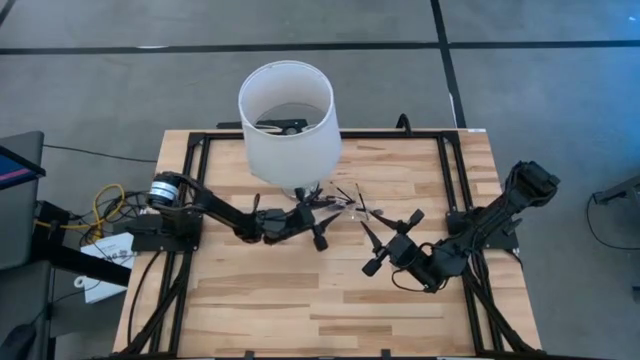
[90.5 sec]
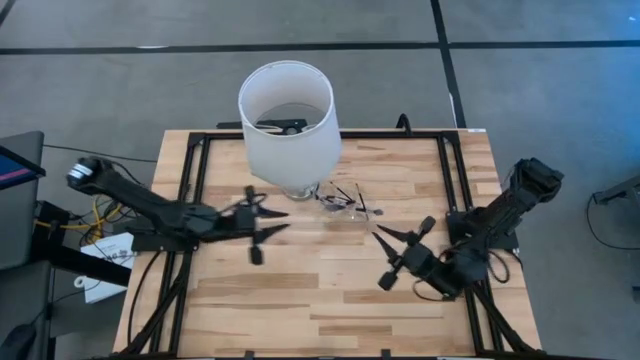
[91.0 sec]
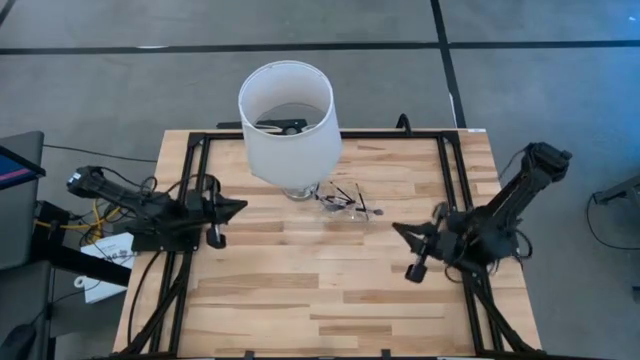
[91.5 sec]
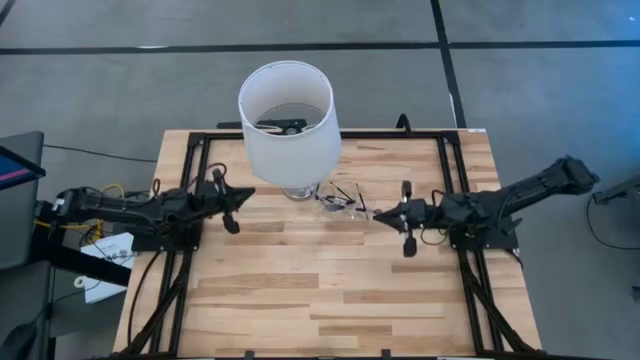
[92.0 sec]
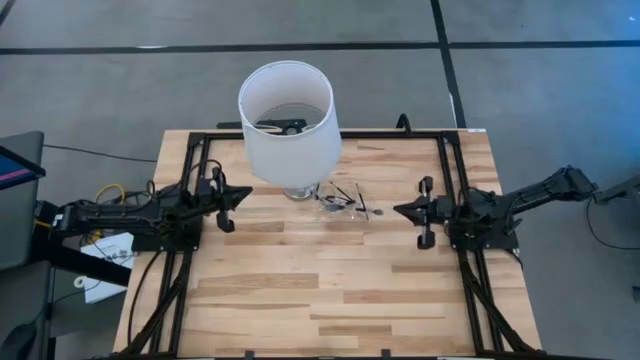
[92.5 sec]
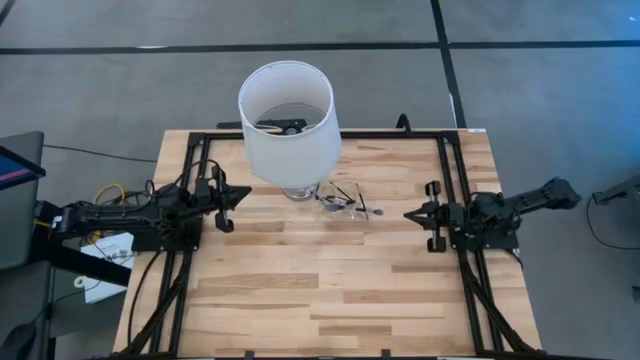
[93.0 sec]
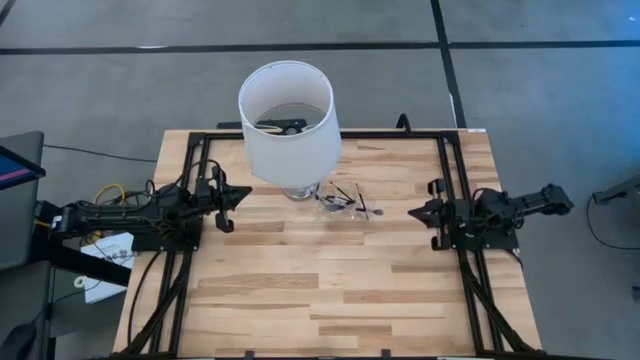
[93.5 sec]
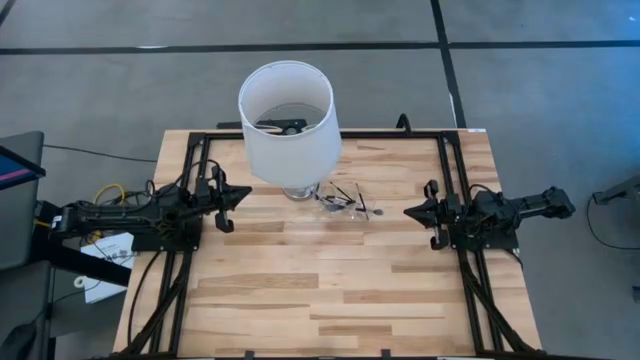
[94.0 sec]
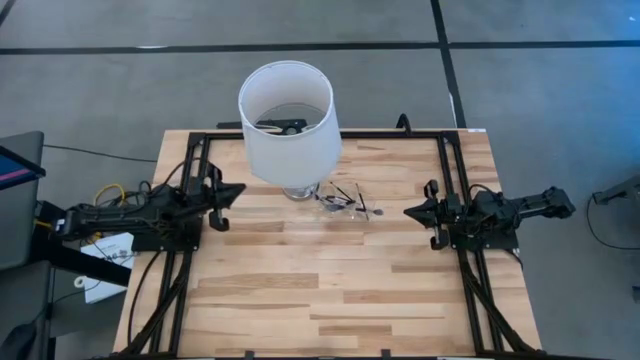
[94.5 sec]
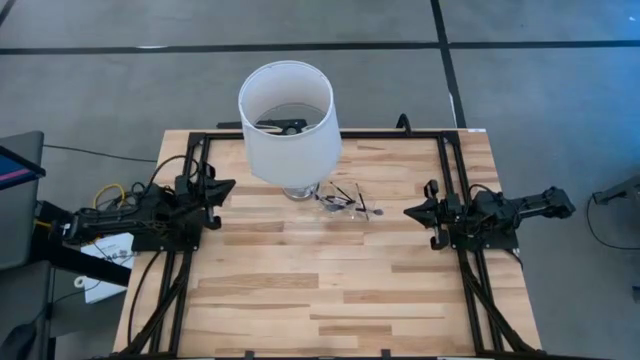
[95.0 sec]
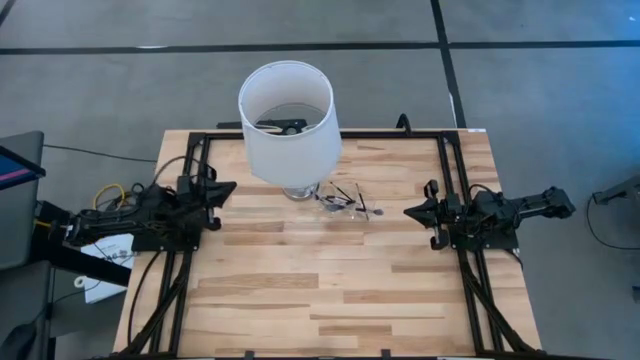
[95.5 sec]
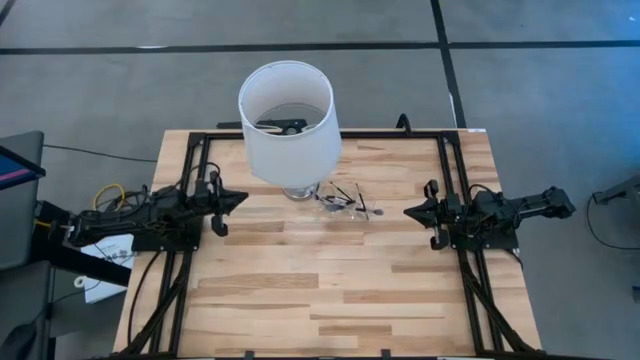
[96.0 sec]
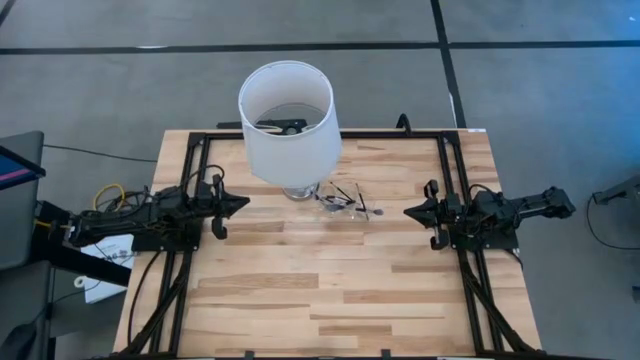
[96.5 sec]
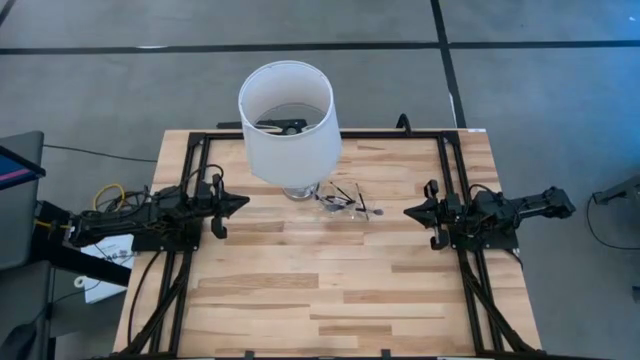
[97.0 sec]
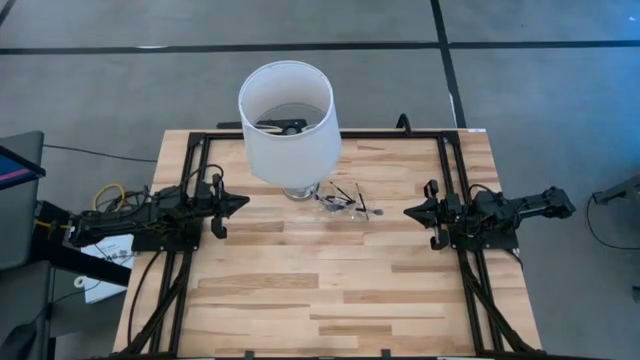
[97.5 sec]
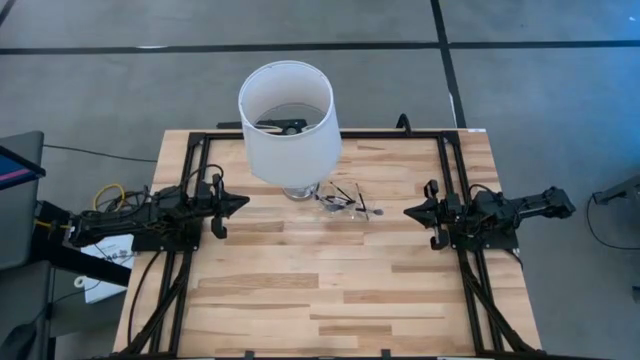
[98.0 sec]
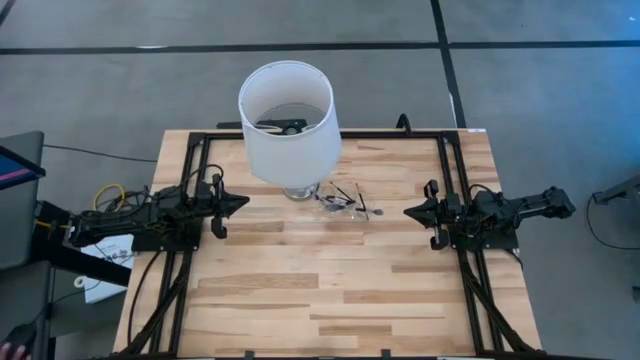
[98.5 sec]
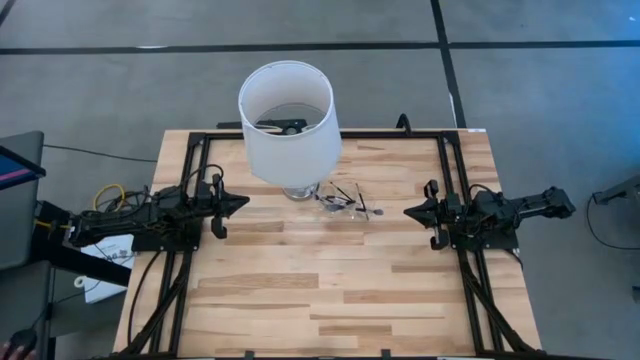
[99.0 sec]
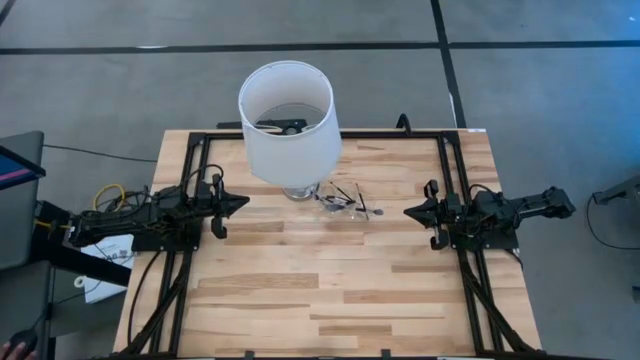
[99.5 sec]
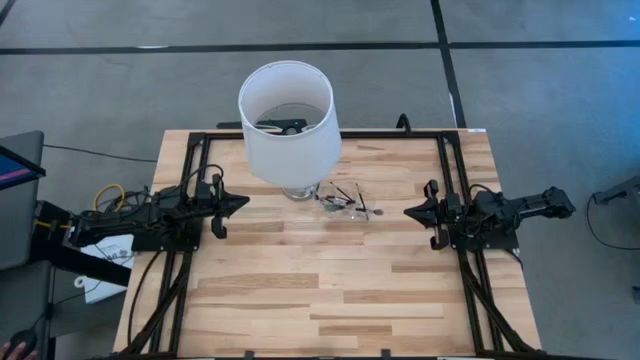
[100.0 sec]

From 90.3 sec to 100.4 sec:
Task: Put items in baskets/containers
Return to Home Position

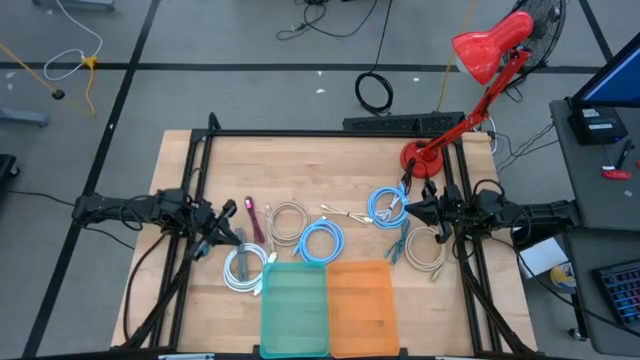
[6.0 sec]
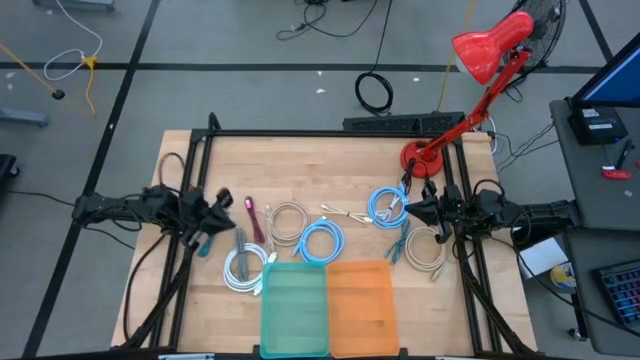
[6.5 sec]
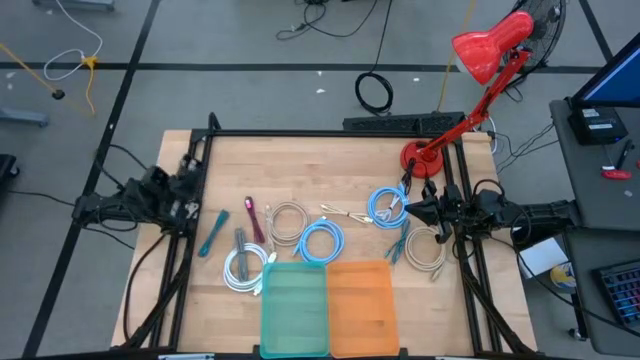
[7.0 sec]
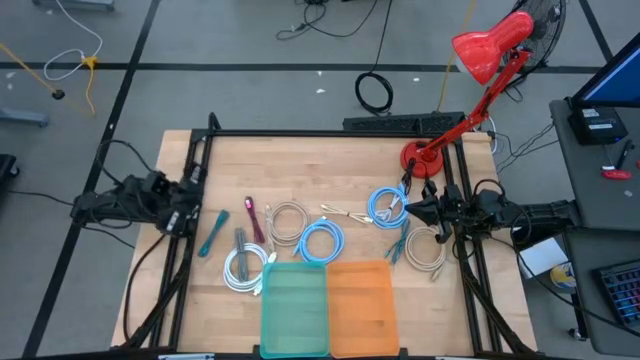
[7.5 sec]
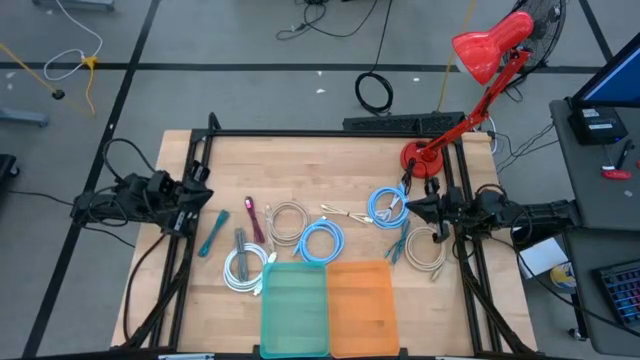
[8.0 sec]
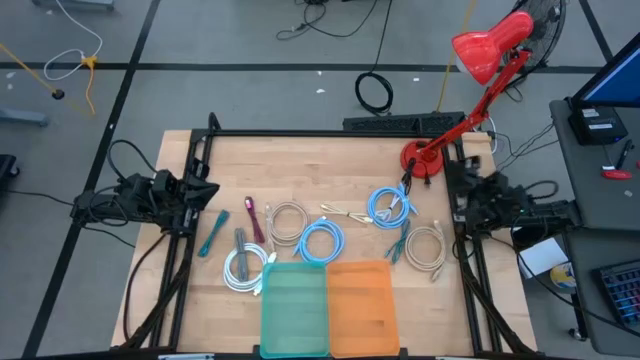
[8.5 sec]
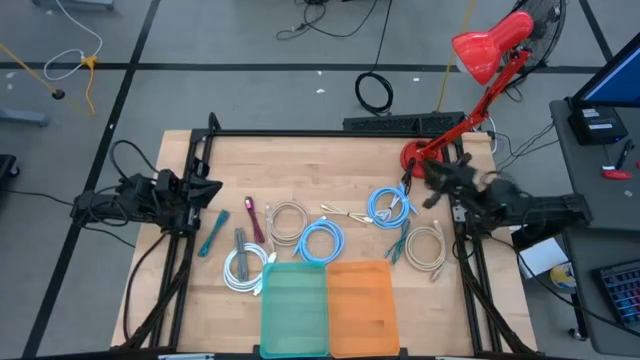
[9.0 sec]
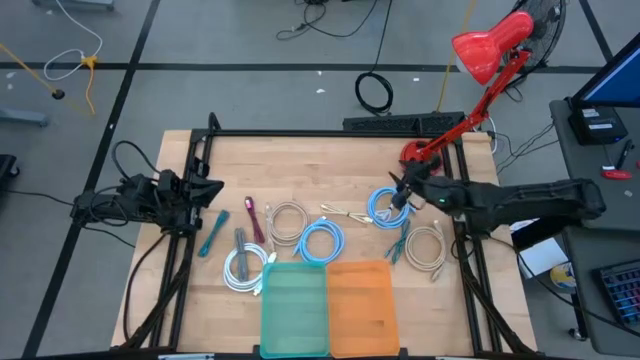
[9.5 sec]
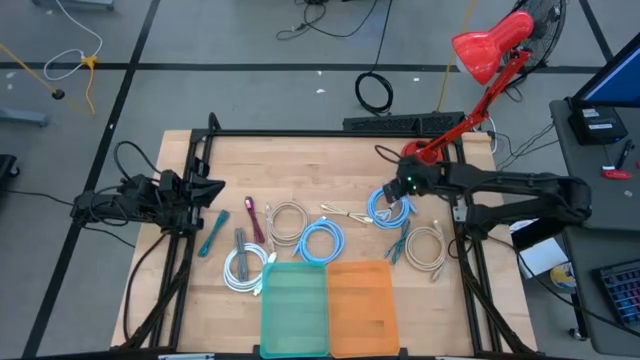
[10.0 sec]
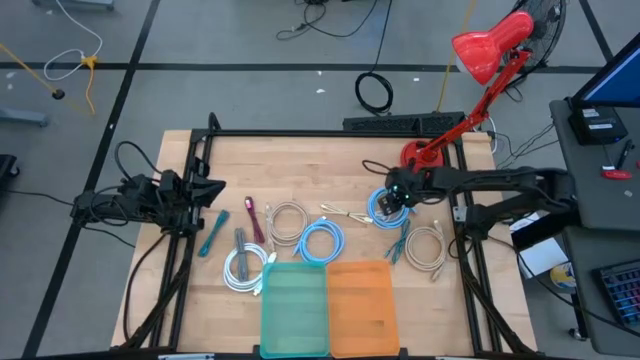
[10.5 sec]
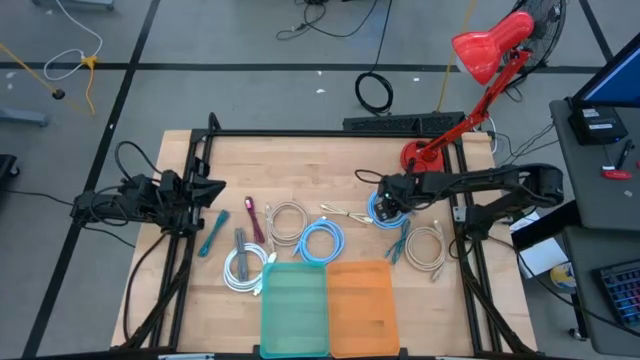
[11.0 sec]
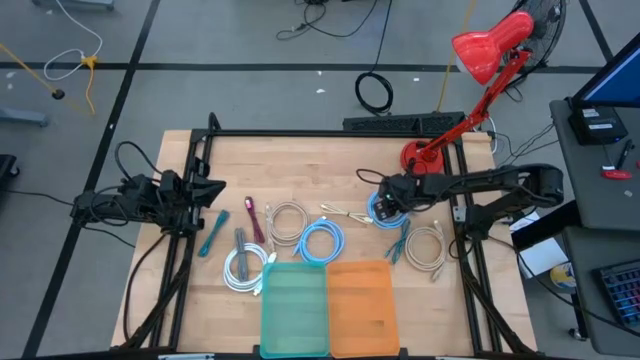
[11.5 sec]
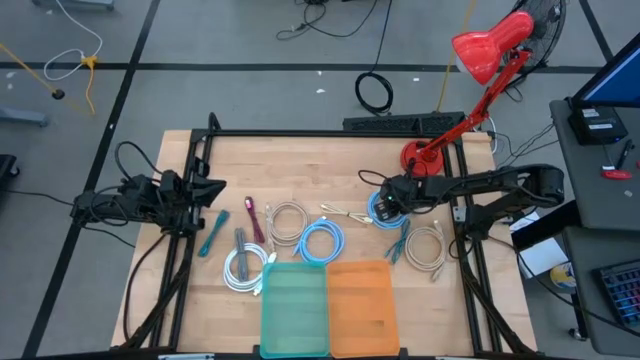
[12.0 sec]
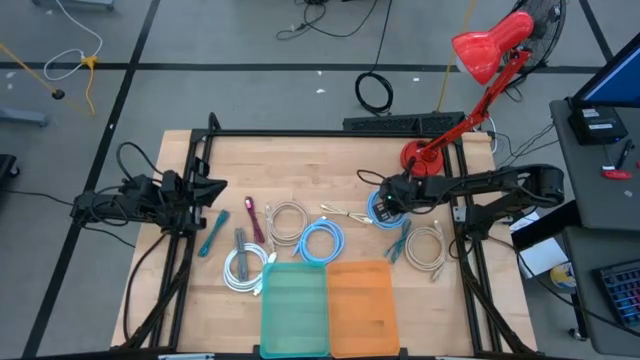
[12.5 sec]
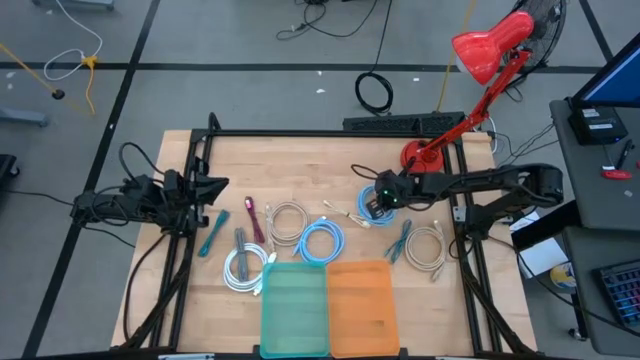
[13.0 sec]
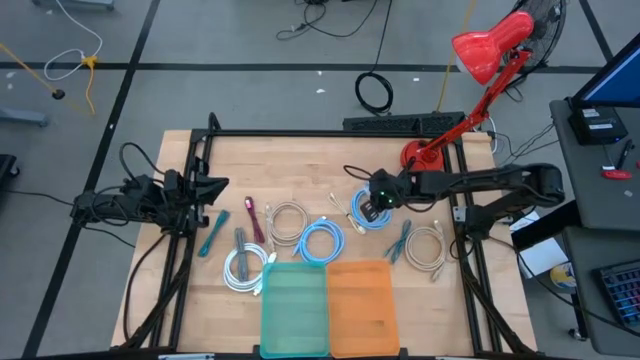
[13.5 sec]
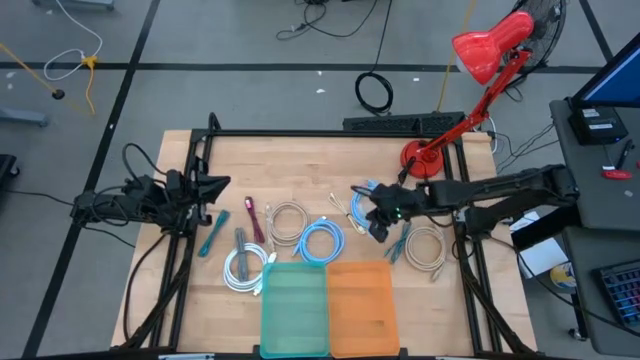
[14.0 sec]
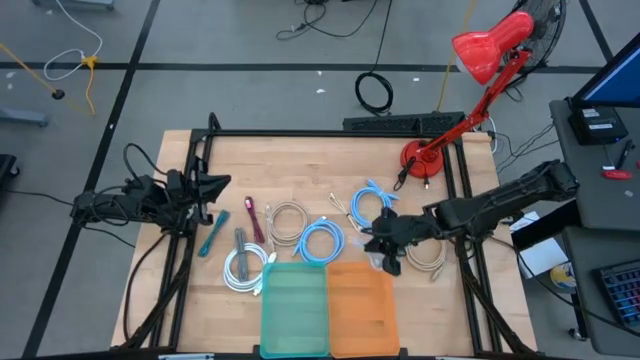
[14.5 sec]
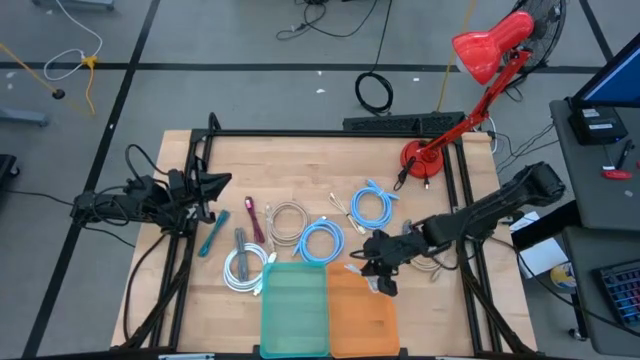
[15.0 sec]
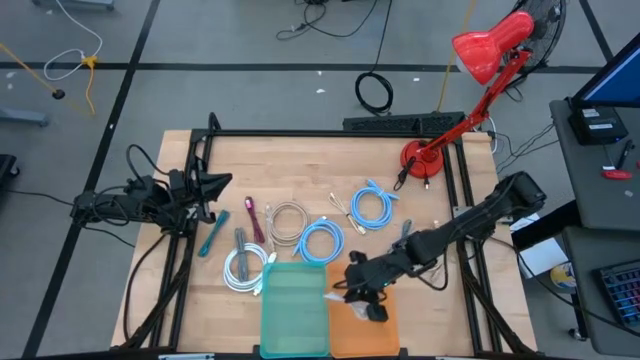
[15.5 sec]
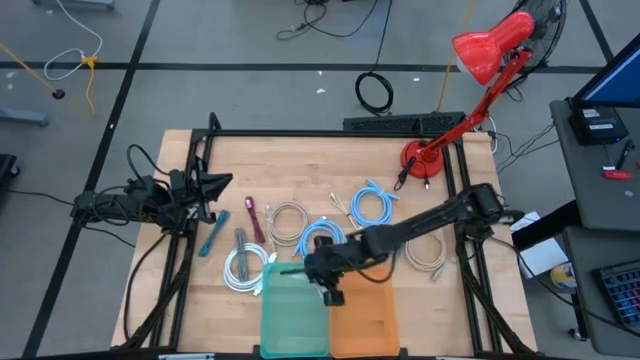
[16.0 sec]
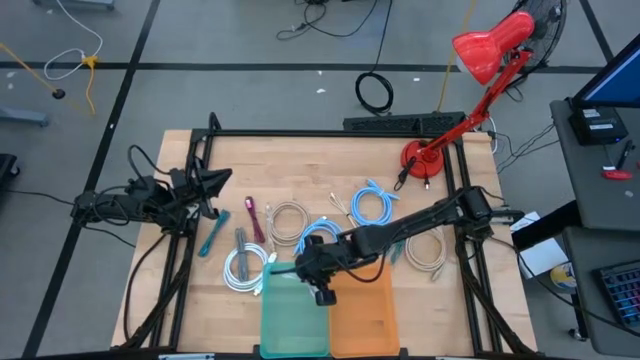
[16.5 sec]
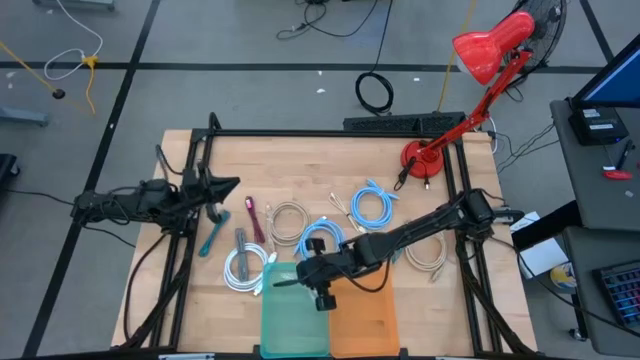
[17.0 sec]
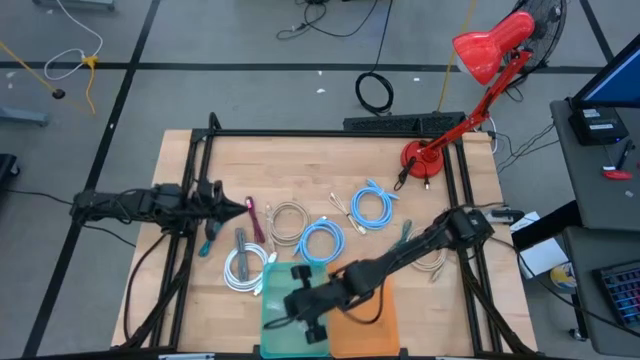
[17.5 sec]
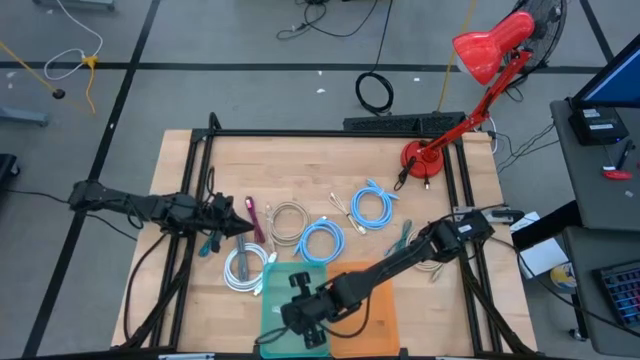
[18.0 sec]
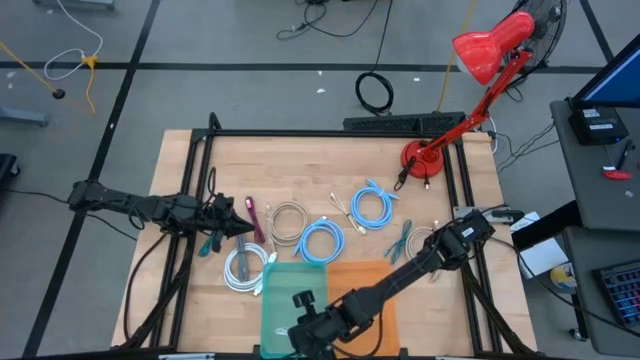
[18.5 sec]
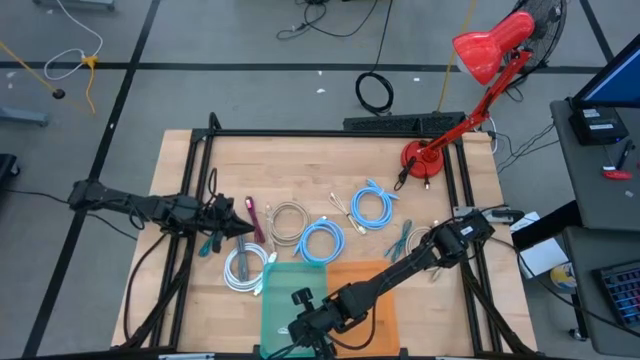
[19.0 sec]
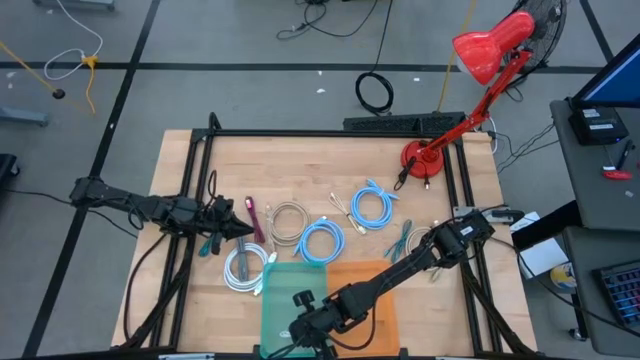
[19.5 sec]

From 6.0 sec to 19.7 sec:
Task: Pick & Place USB Port
Put the white charger cable into the green bin
